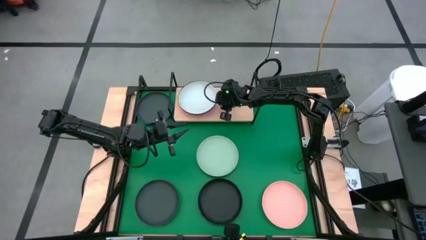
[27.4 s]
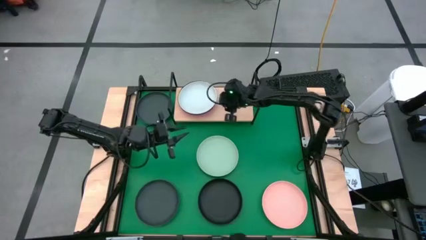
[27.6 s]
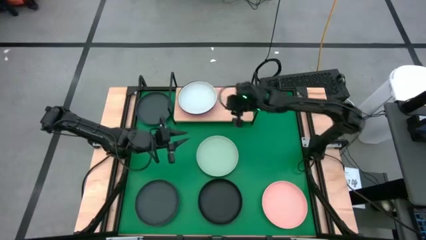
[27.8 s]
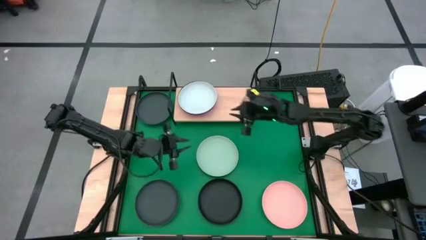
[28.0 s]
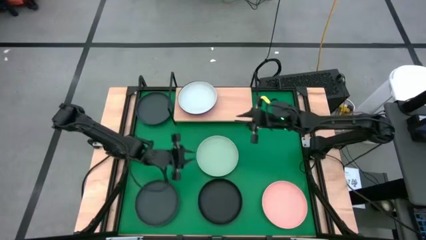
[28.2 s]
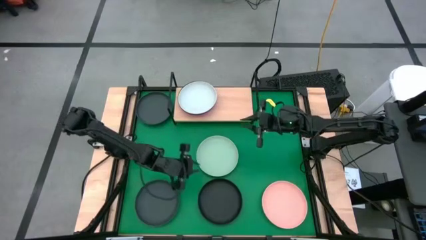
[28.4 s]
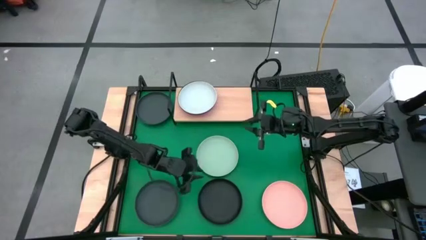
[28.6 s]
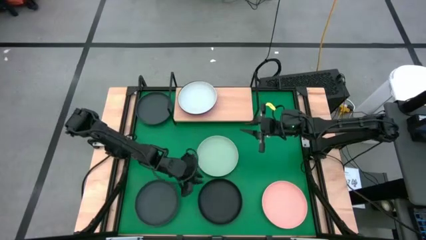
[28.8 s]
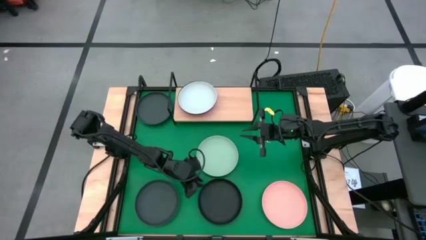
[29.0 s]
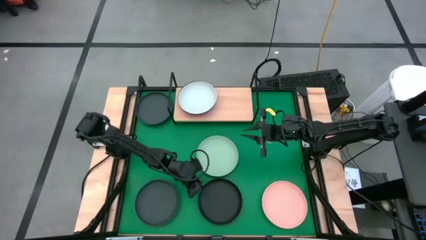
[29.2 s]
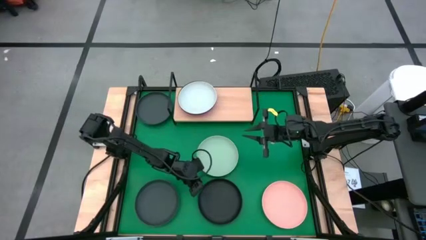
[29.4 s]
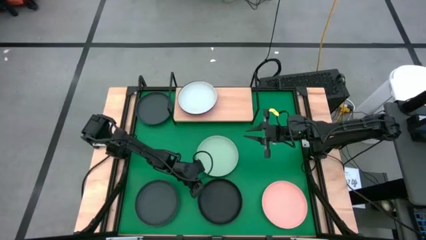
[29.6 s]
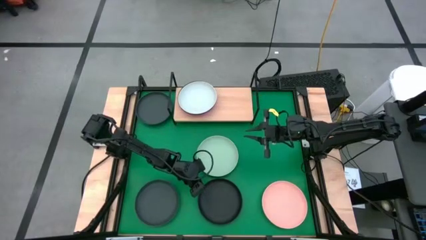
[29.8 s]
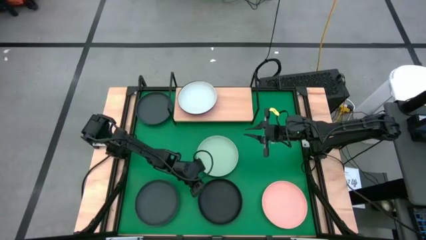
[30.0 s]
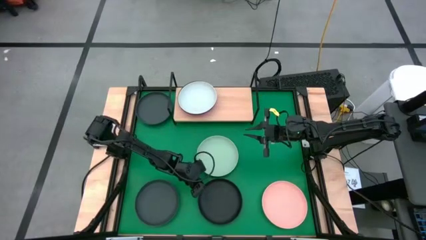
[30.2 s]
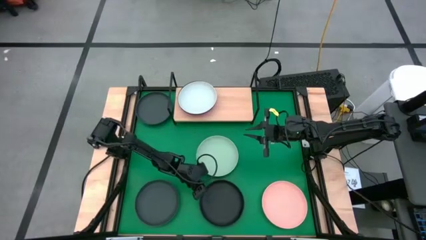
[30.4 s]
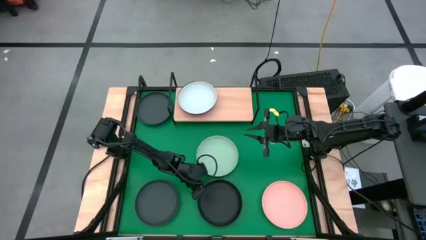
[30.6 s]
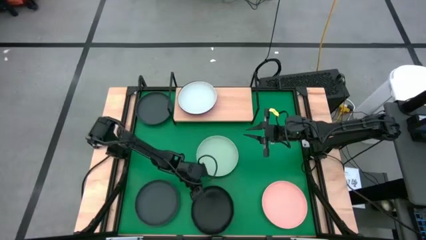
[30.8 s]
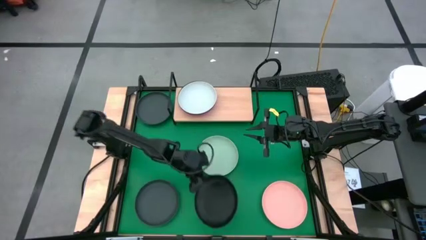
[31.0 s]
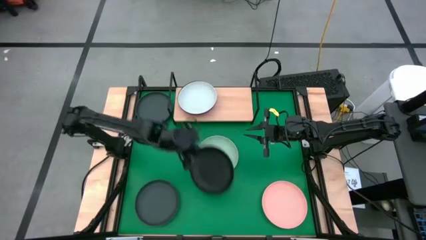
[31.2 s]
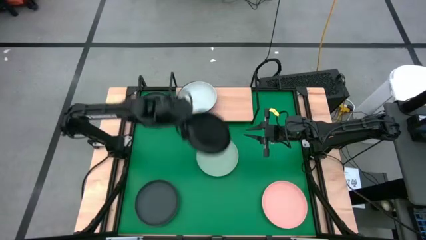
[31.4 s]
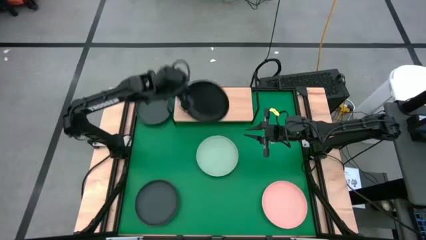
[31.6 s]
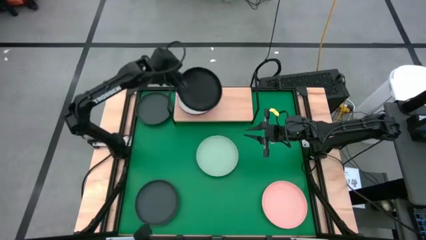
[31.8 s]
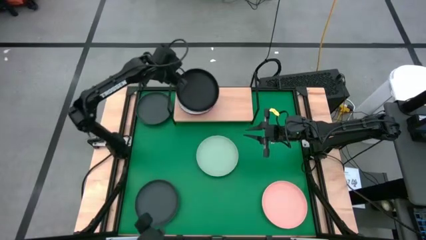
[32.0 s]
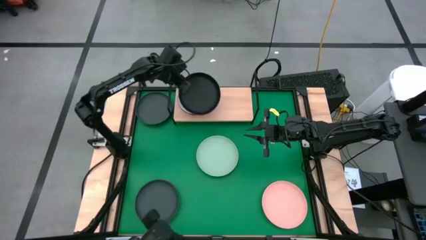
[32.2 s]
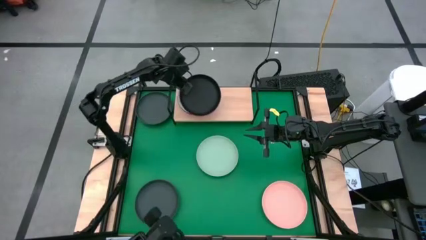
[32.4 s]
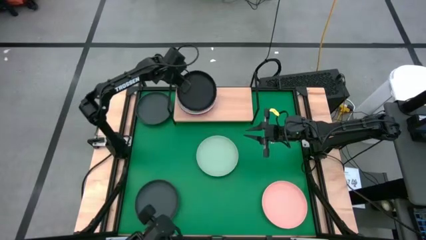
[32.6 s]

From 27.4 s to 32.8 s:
Task: Place and stack plates onto a shelf
Stack the bottom right black plate on top of the white plate on the shelf

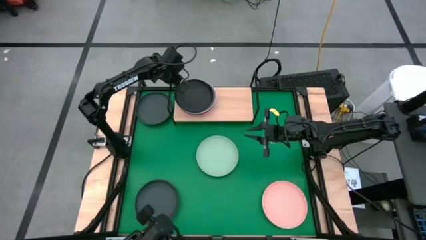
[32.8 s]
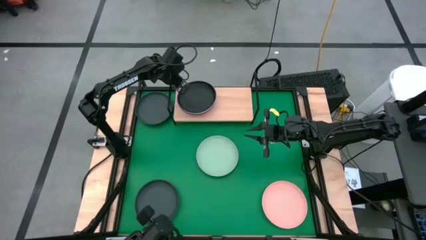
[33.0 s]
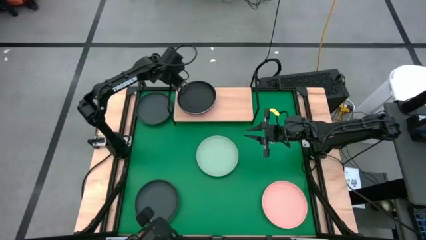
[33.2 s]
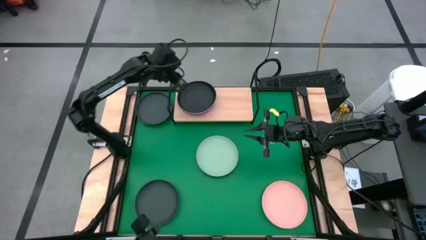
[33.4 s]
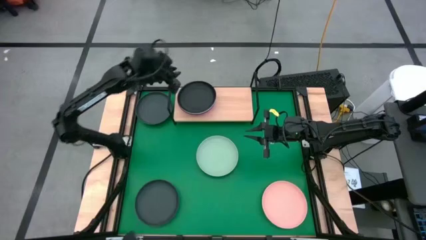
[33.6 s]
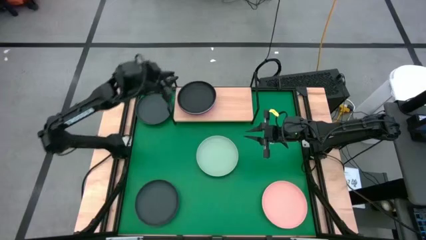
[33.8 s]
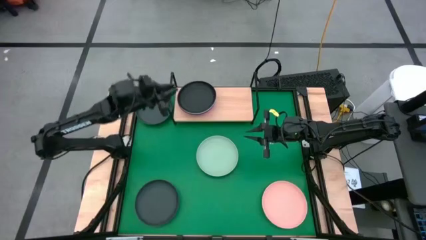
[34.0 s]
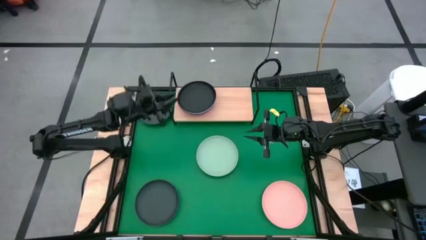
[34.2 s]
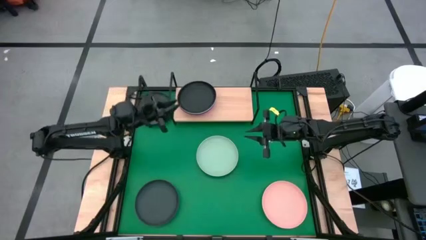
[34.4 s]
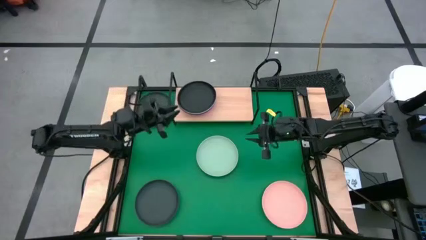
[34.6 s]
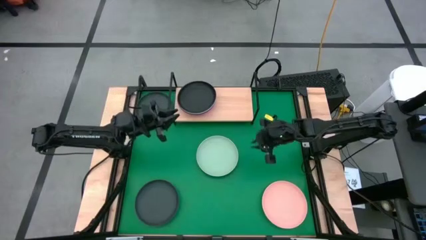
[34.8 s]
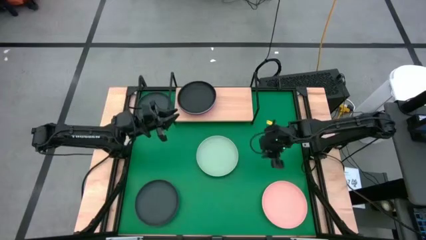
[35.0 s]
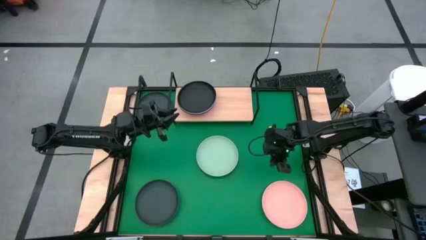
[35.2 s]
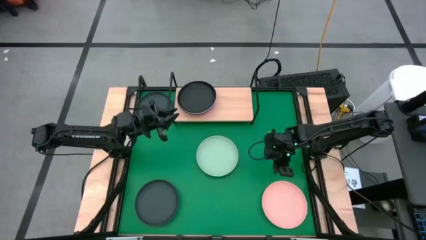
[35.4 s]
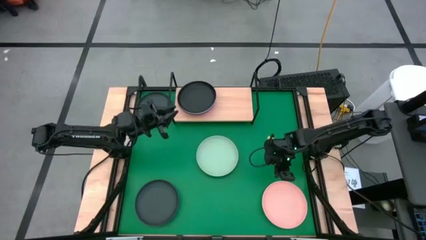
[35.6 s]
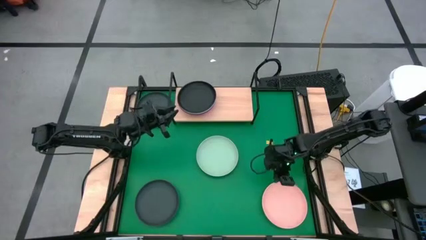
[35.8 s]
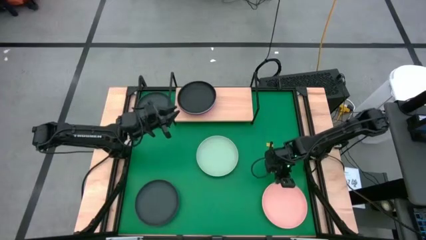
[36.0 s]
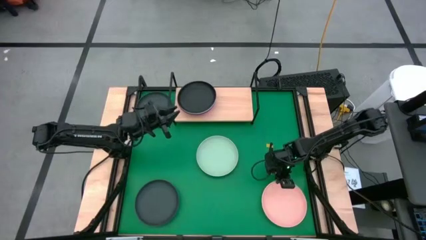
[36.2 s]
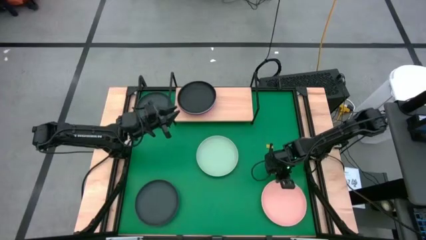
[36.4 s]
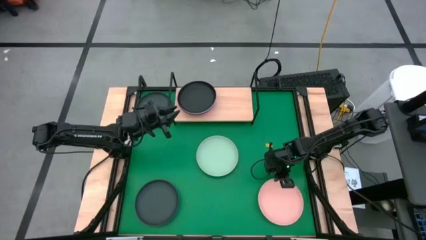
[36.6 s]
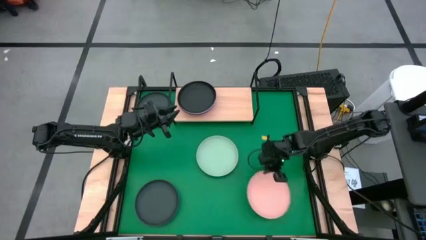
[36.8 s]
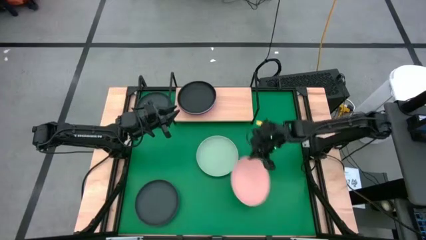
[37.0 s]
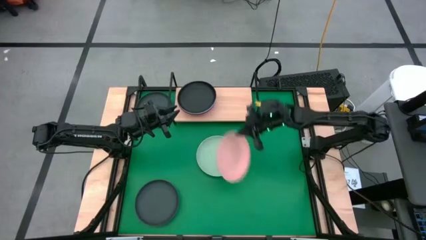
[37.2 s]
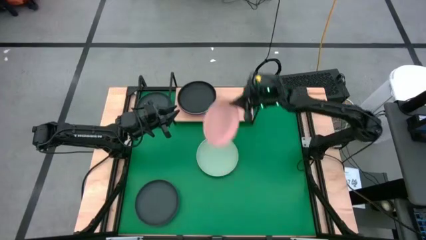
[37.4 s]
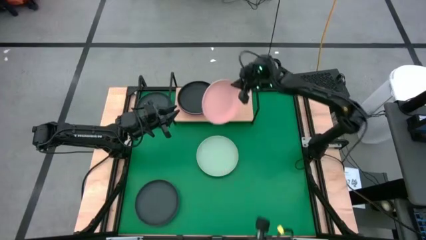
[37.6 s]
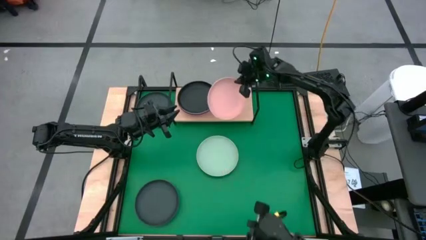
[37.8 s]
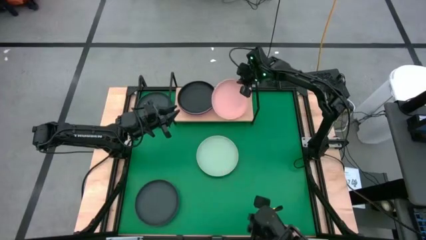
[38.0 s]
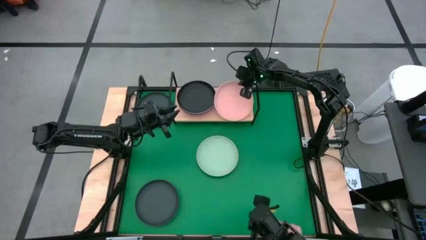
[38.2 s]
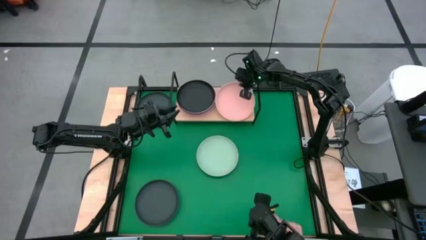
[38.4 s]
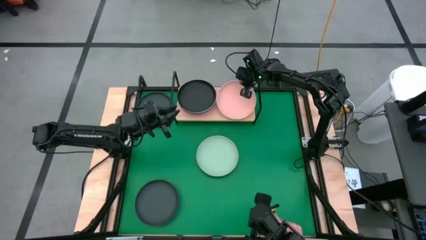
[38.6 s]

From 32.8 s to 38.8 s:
Put the light pink plate on the shelf

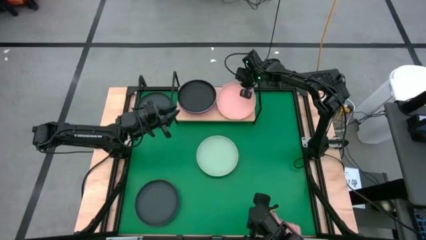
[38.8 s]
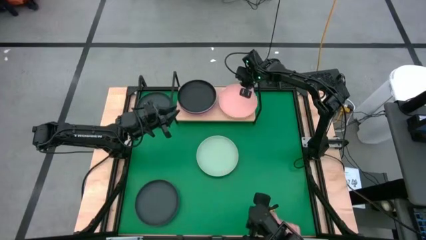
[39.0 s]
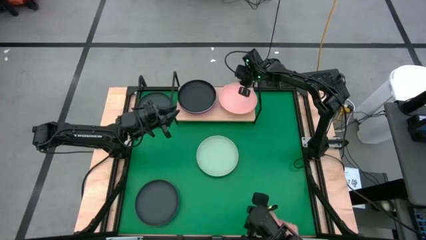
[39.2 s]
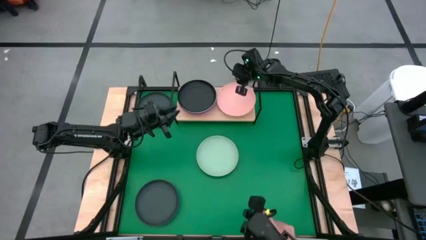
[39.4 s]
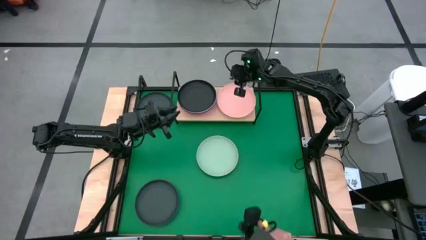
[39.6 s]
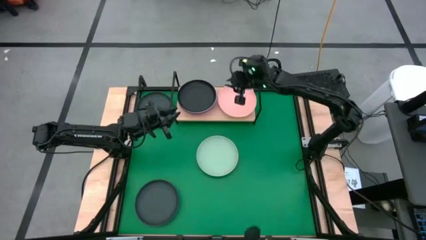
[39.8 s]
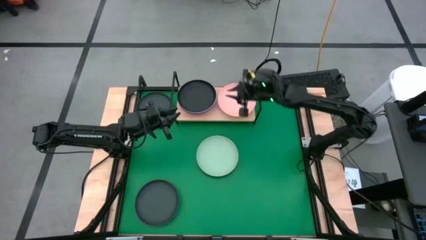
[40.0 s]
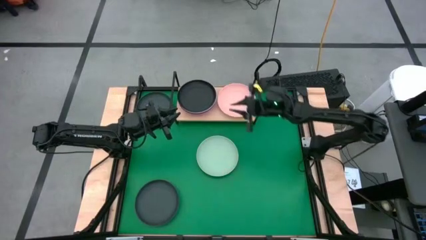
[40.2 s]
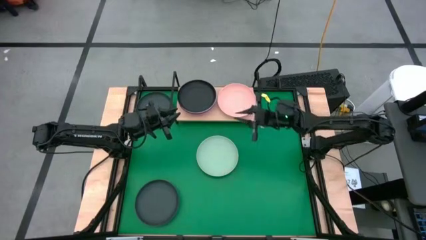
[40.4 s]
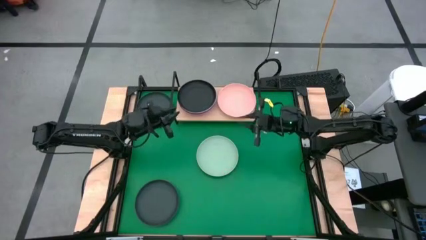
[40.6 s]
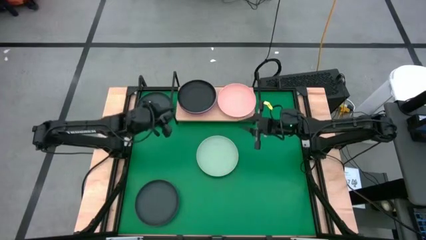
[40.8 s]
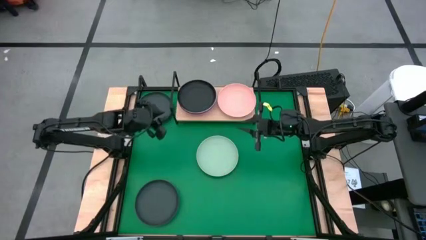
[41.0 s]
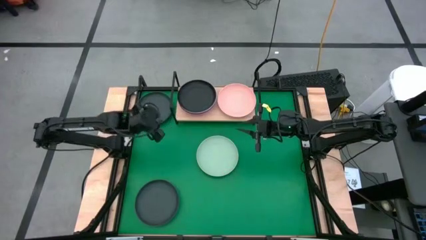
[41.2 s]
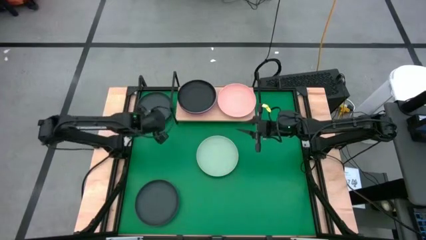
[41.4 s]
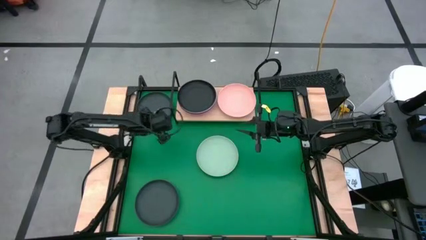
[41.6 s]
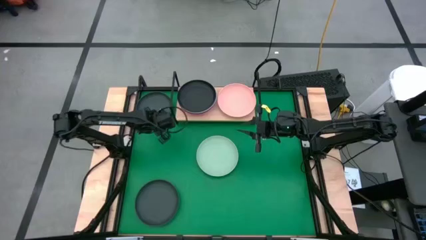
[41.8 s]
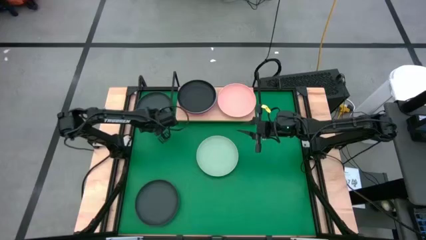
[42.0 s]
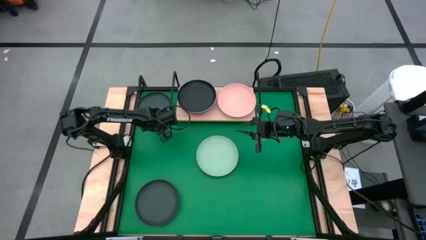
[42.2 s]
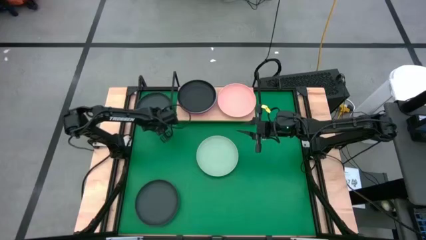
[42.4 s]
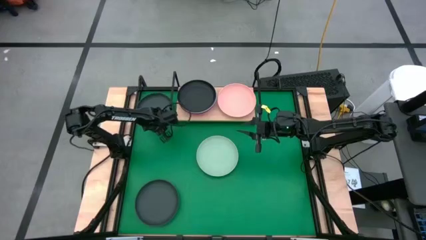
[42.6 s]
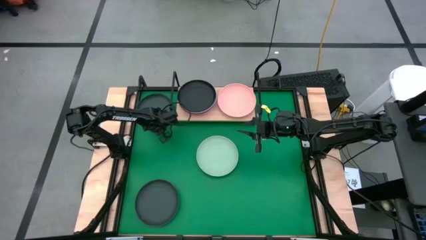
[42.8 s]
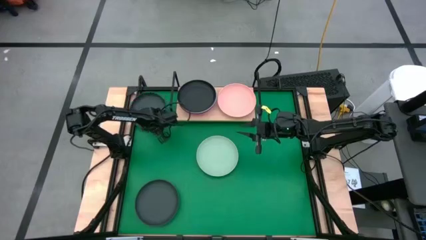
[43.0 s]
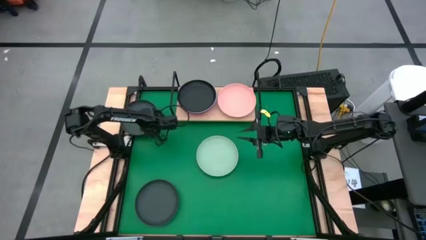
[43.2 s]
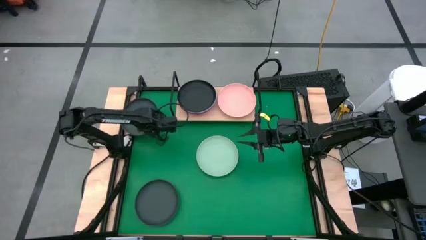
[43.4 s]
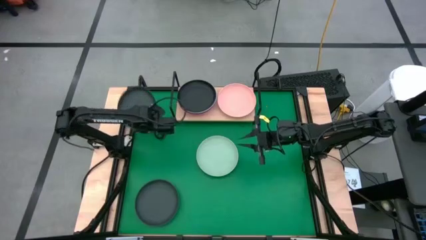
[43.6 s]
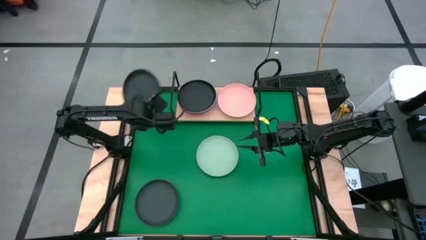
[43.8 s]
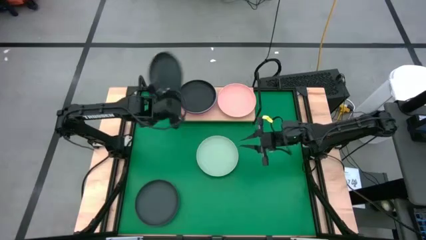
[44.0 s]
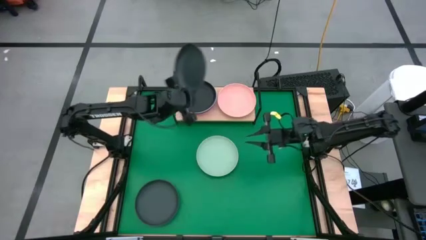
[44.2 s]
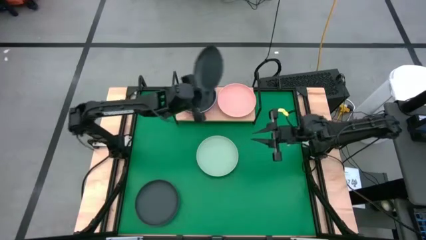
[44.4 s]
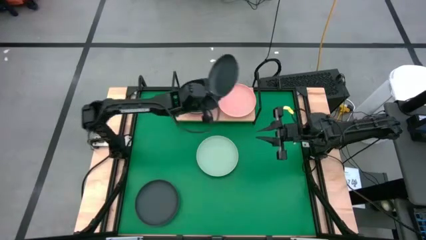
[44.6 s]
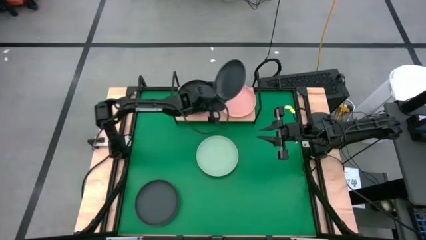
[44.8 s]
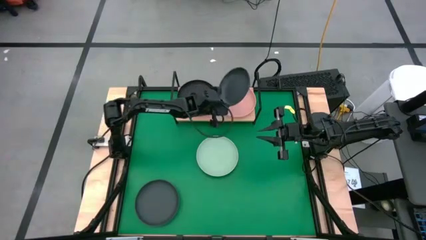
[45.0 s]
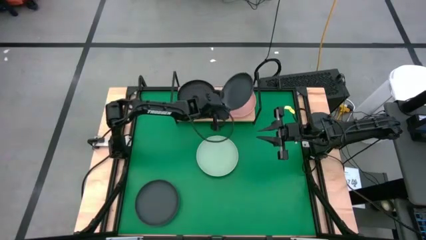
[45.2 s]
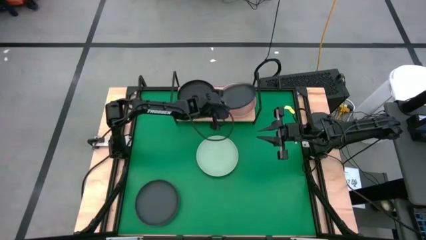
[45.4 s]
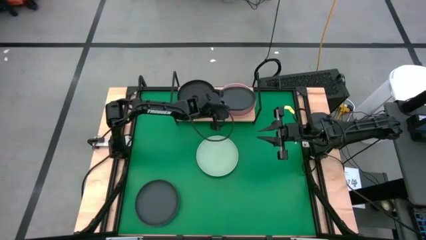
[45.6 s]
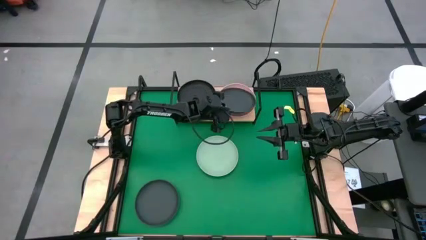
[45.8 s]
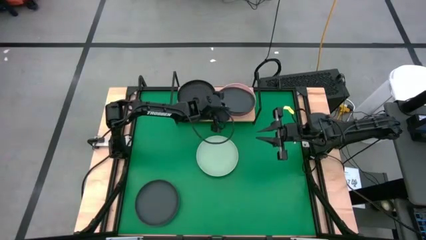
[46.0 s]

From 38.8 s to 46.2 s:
Stack the top black plate on top of the light pink plate on the shelf
